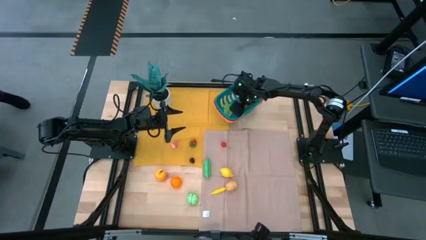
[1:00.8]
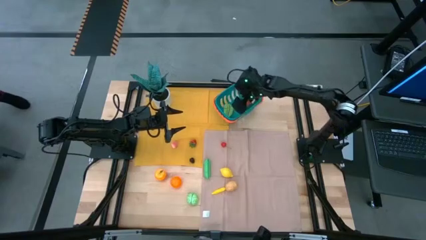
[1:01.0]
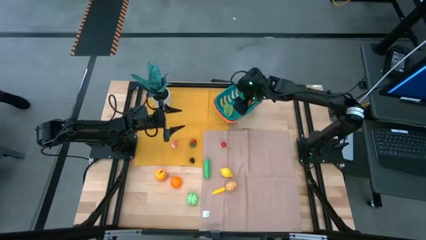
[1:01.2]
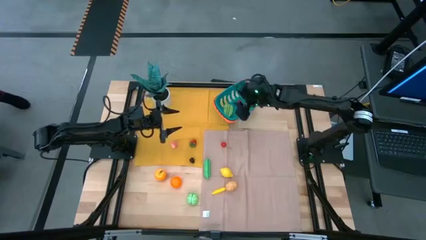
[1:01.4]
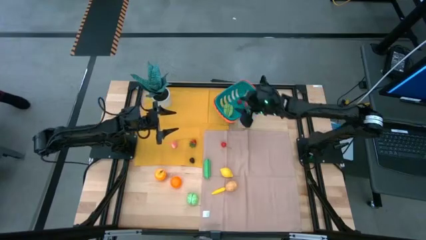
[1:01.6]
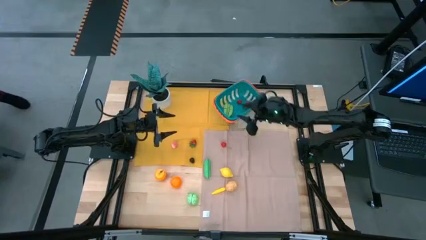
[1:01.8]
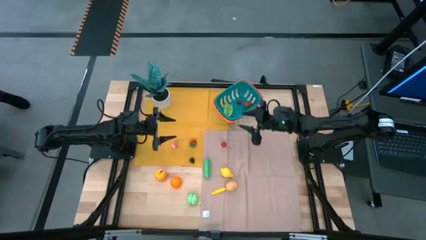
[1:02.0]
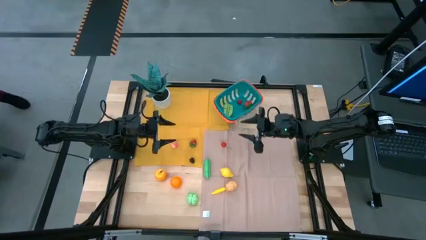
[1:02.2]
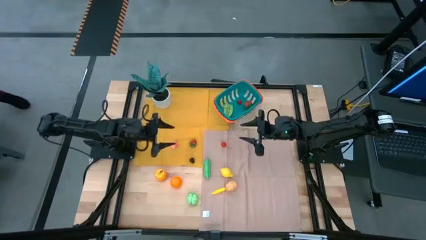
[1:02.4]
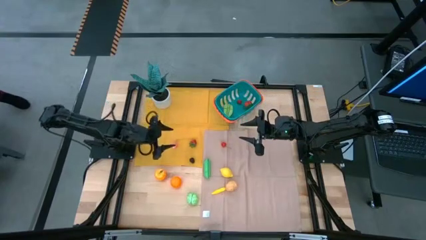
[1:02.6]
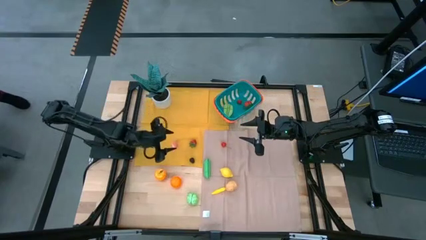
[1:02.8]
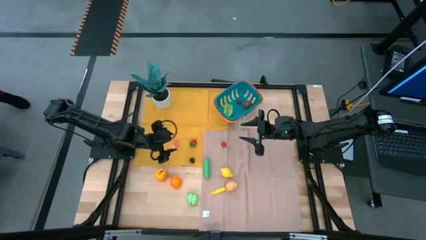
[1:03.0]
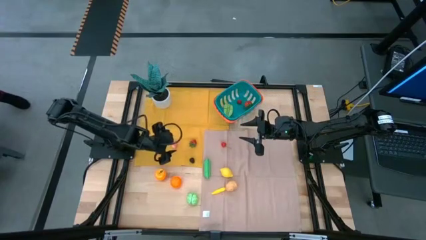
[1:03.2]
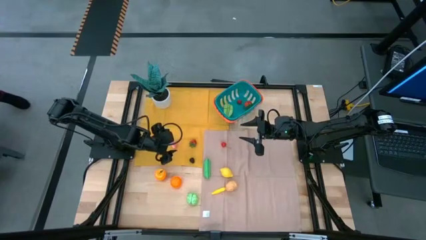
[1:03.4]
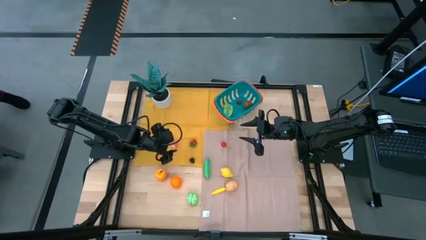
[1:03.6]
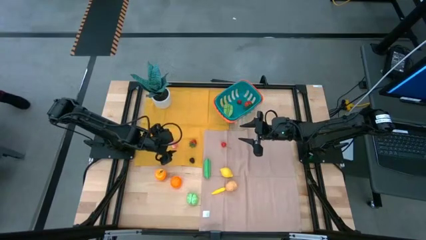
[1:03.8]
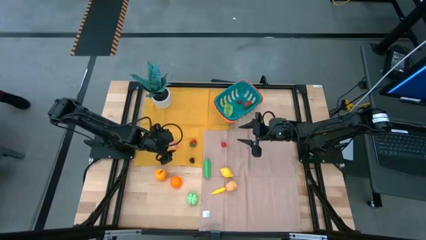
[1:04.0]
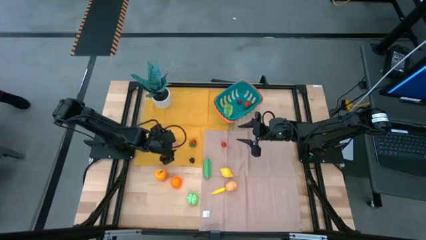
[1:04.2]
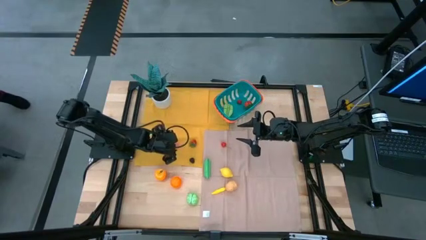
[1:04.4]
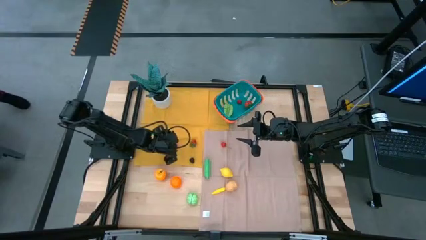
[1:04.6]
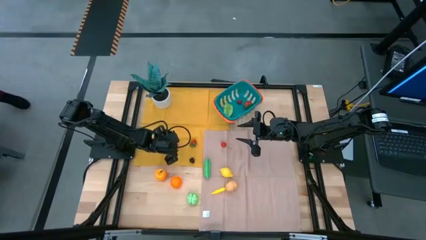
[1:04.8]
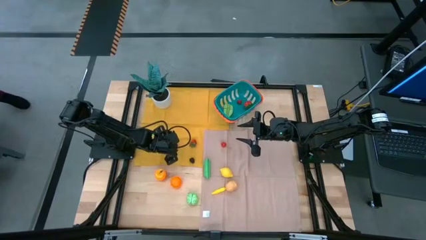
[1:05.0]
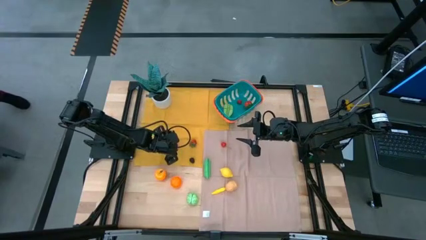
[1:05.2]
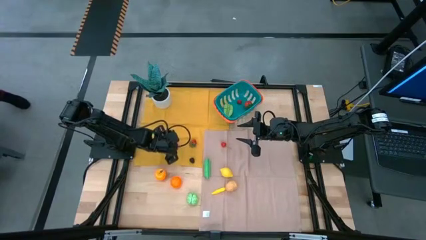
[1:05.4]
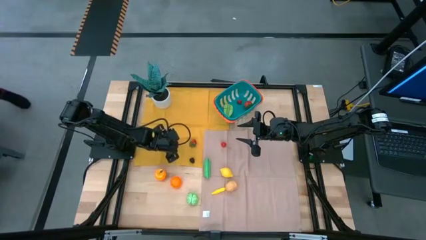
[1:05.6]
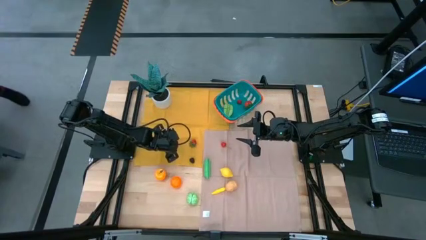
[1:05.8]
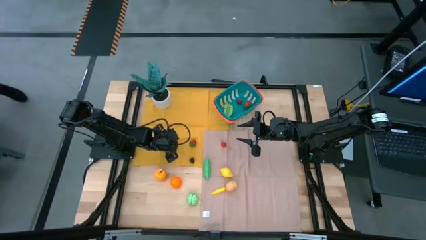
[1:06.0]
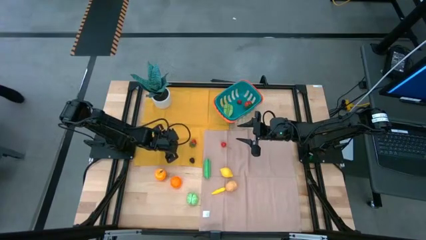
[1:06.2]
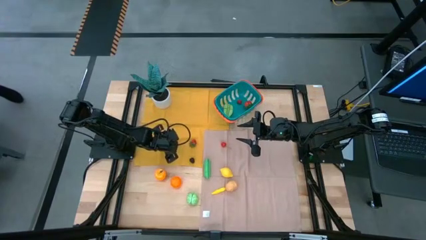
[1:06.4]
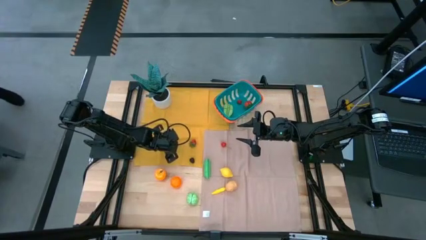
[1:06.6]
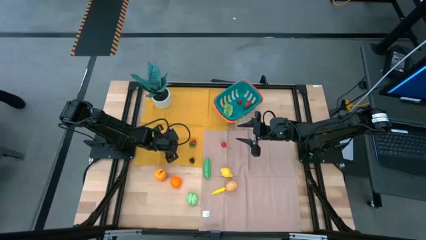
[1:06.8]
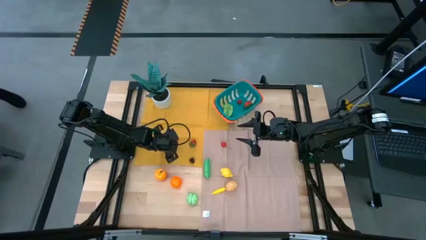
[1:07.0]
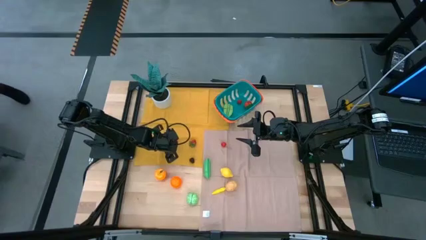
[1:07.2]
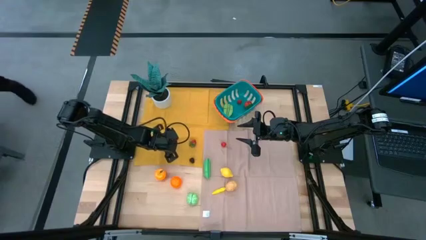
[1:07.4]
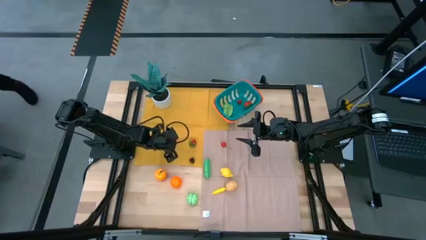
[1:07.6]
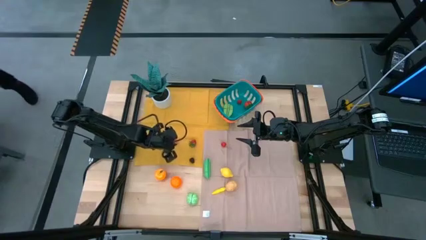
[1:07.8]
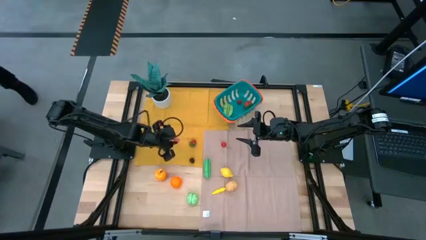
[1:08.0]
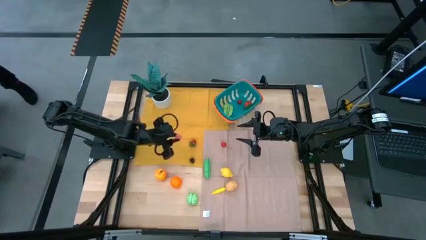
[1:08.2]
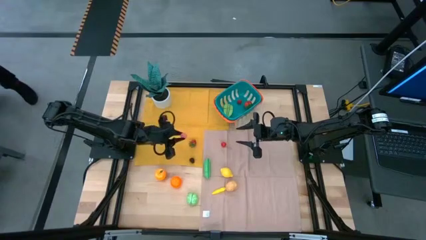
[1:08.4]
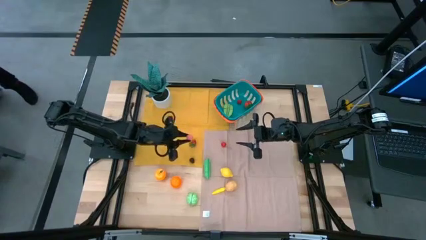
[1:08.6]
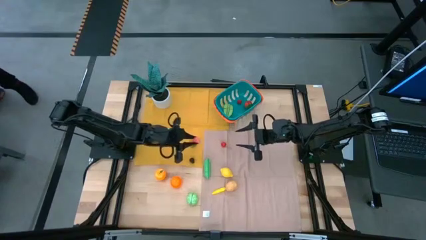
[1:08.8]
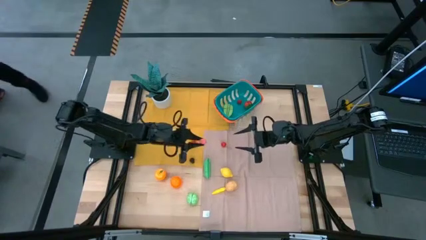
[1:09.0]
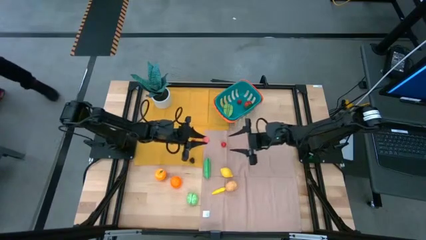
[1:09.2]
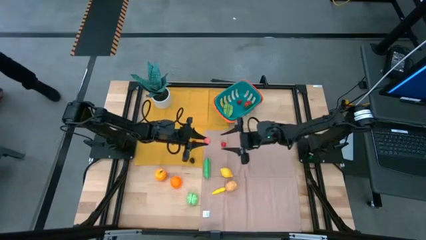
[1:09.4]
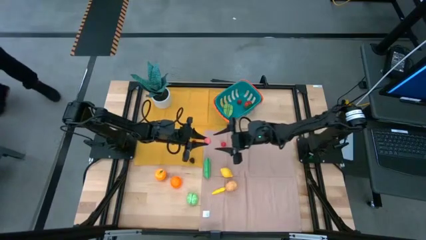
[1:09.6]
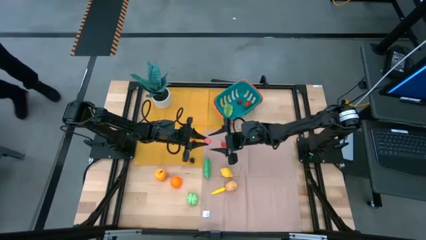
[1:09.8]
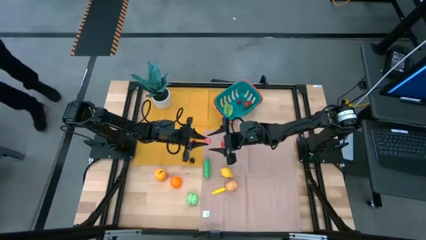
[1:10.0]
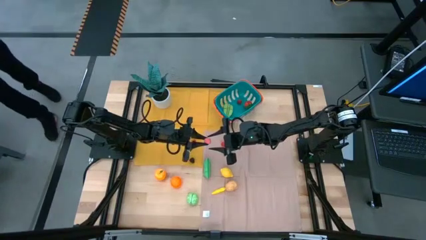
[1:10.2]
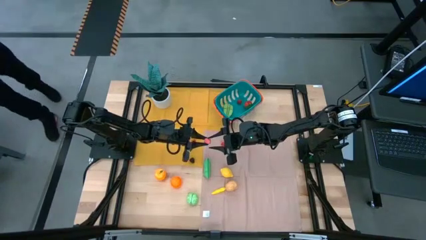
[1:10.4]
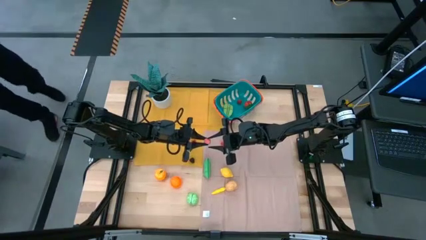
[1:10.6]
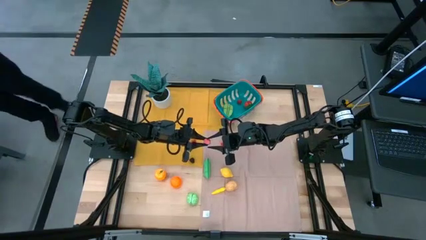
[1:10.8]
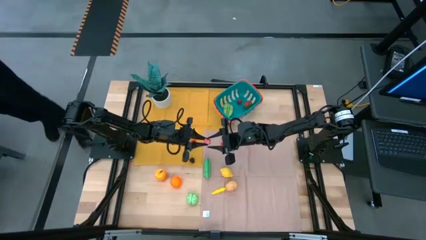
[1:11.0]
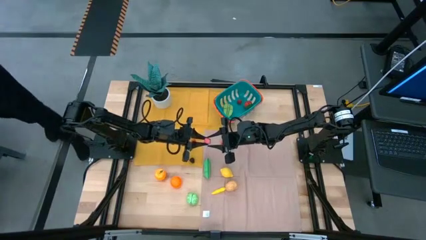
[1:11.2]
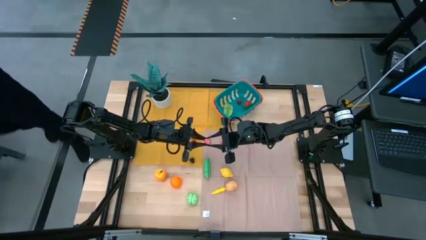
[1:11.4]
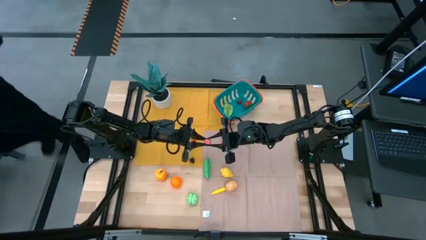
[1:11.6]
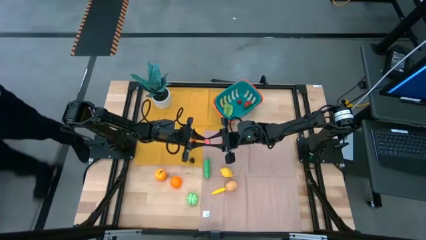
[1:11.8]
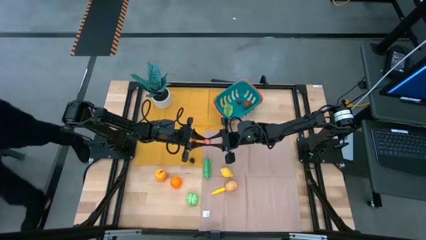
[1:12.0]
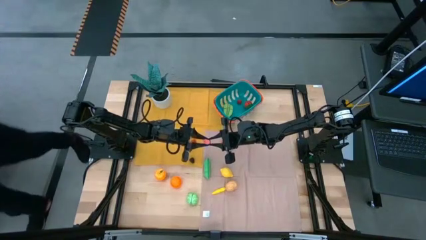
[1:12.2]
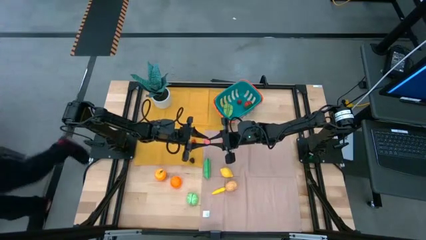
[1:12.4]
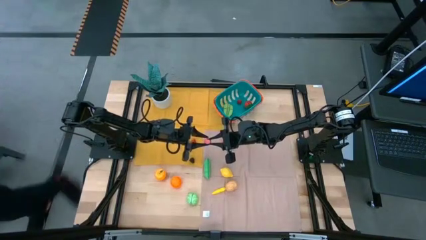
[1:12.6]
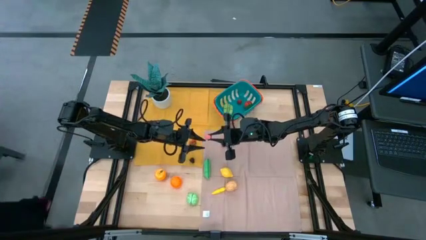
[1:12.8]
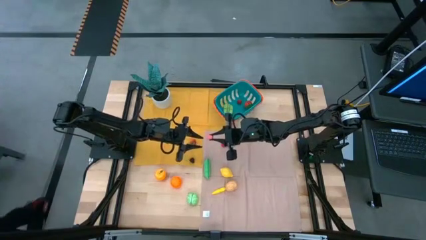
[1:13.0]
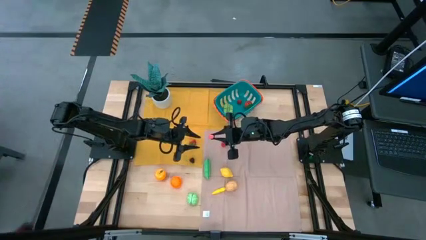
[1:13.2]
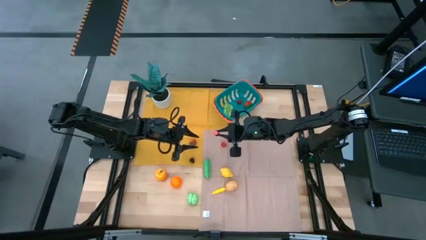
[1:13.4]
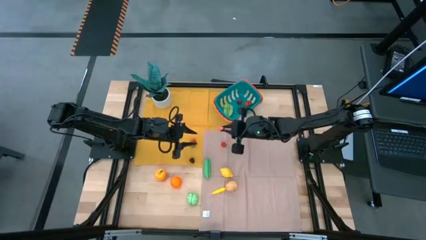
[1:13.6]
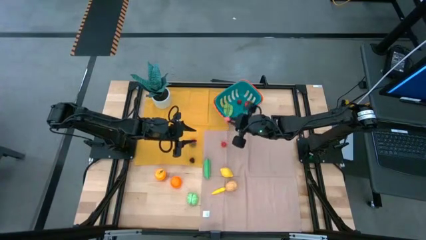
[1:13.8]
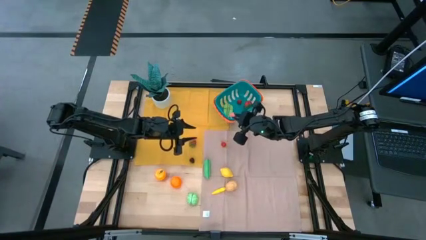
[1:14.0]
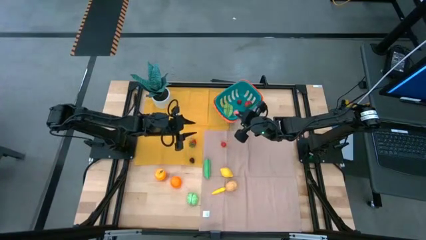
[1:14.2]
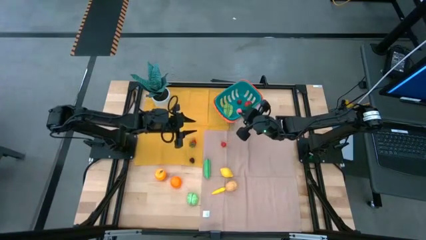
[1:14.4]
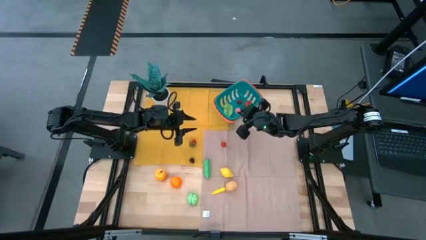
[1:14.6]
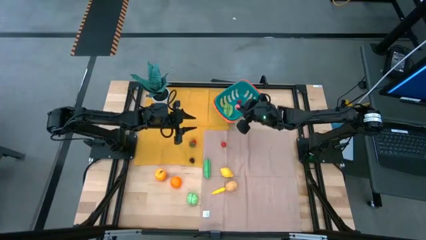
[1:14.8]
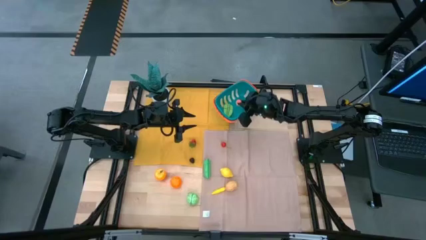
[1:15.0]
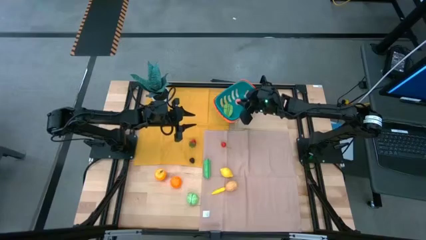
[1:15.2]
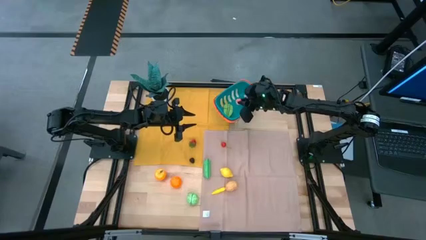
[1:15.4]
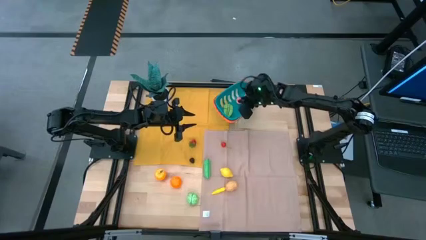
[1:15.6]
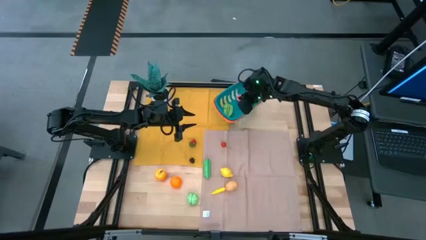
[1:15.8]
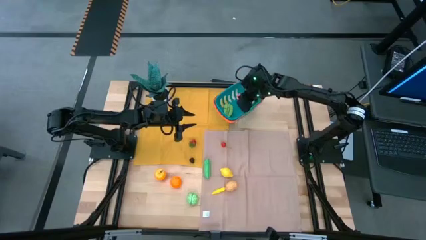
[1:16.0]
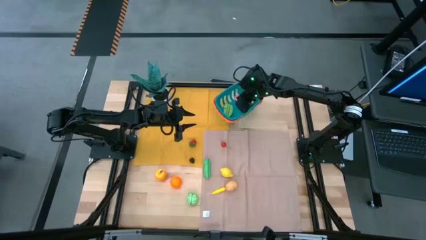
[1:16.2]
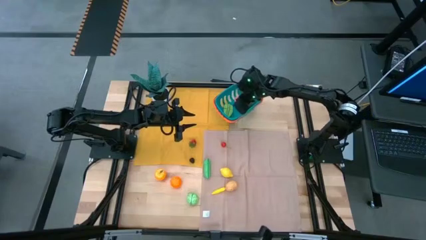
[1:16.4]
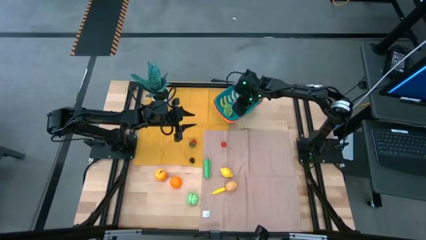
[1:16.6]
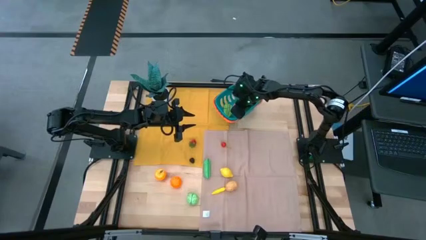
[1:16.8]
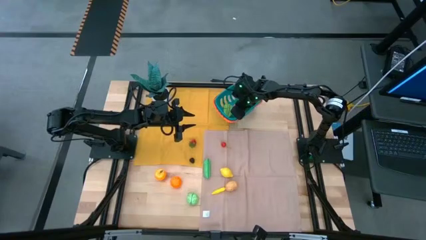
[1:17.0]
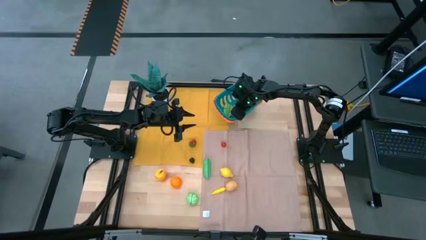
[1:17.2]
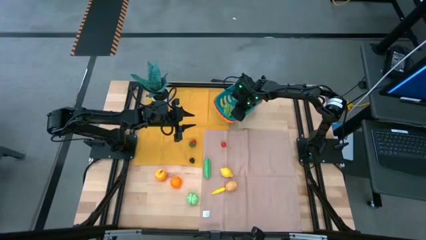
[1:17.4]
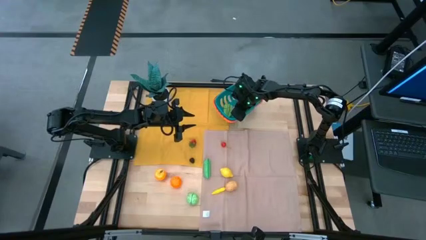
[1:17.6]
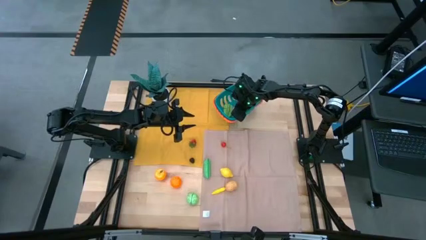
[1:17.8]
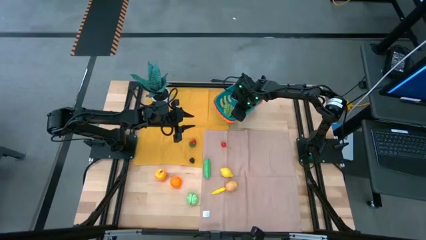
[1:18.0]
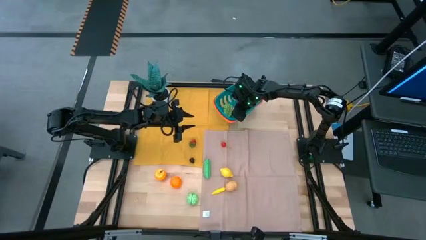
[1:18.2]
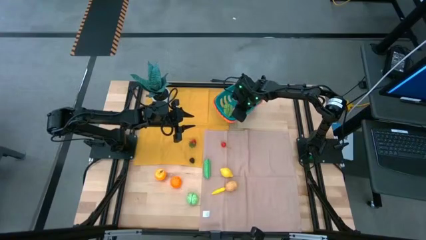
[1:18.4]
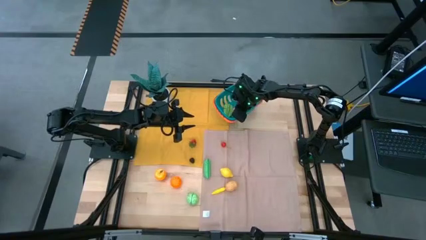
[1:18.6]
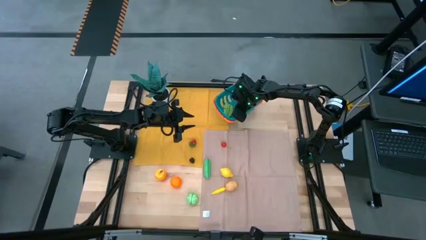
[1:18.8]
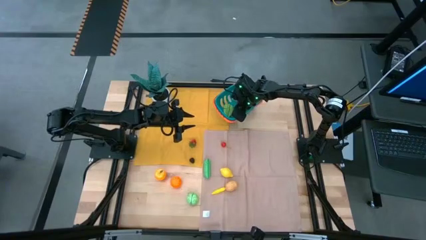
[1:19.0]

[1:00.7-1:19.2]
Task: Pick and placing Produce into tupperware
Put the peach into the basket
